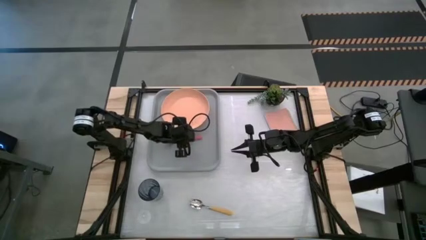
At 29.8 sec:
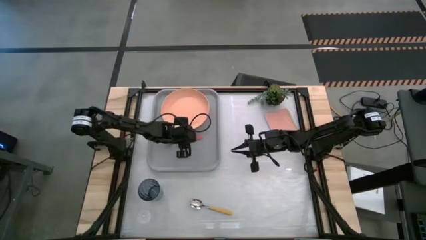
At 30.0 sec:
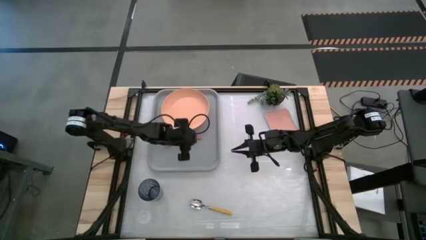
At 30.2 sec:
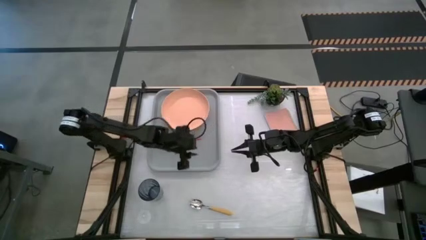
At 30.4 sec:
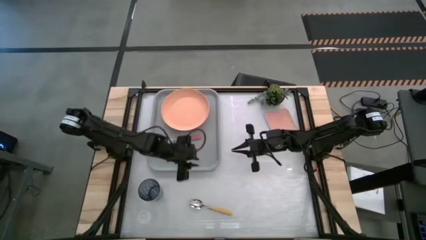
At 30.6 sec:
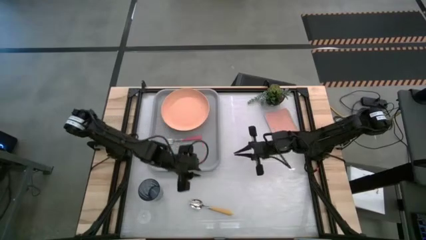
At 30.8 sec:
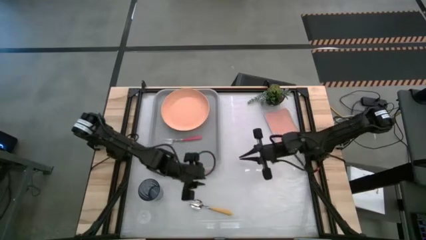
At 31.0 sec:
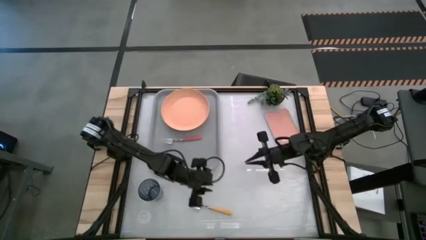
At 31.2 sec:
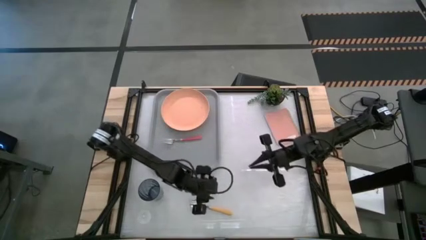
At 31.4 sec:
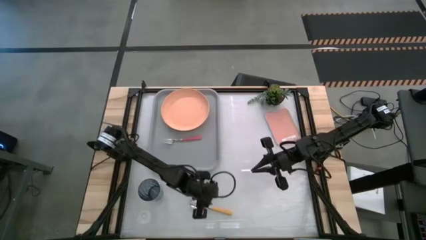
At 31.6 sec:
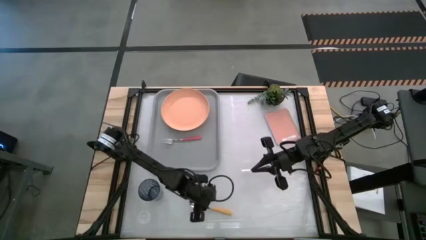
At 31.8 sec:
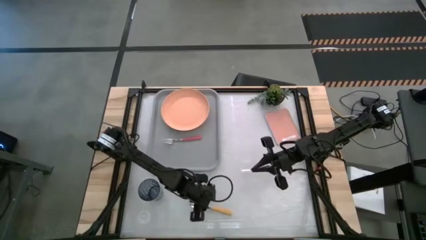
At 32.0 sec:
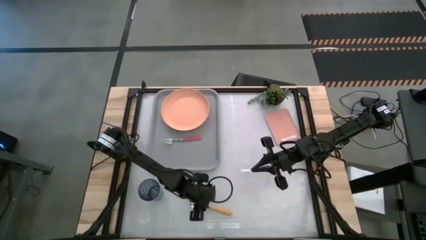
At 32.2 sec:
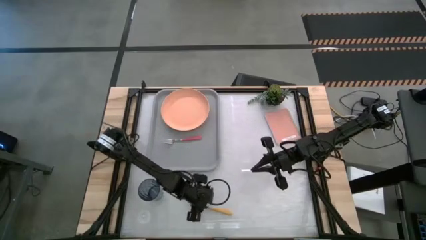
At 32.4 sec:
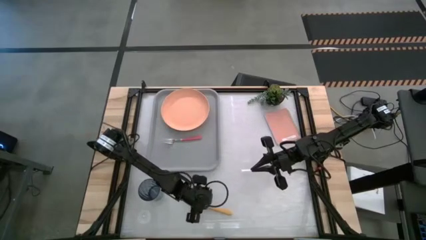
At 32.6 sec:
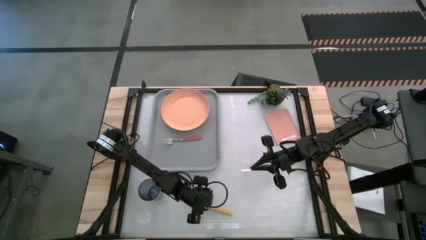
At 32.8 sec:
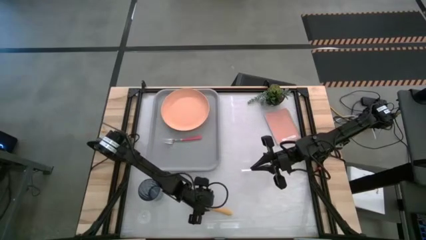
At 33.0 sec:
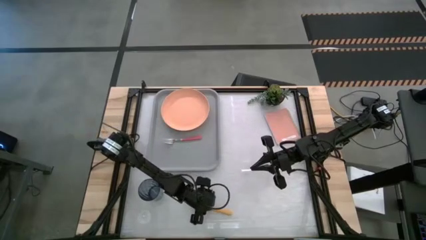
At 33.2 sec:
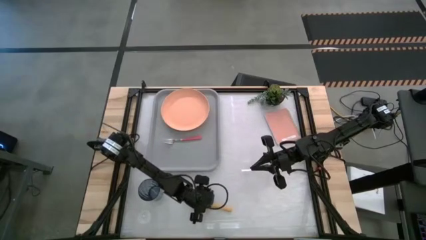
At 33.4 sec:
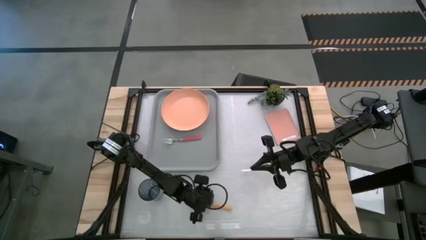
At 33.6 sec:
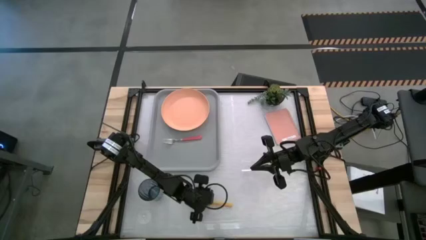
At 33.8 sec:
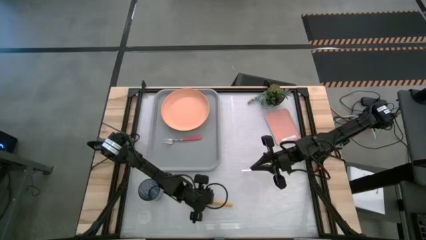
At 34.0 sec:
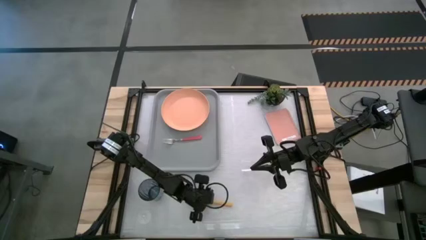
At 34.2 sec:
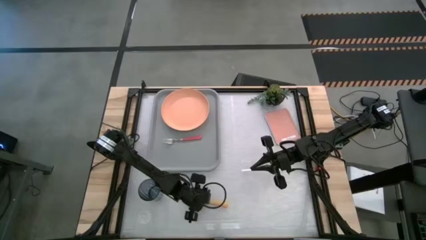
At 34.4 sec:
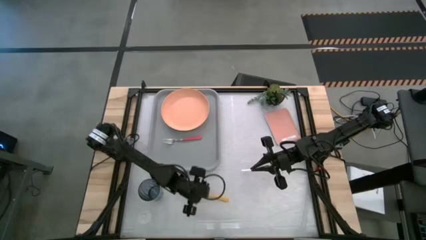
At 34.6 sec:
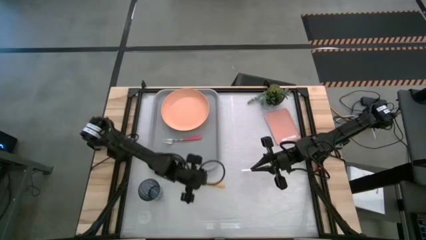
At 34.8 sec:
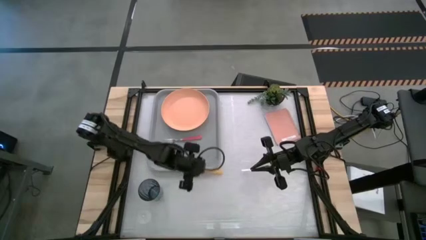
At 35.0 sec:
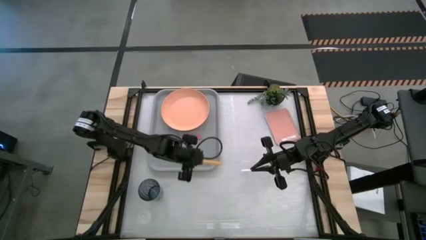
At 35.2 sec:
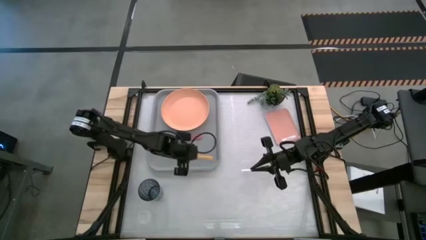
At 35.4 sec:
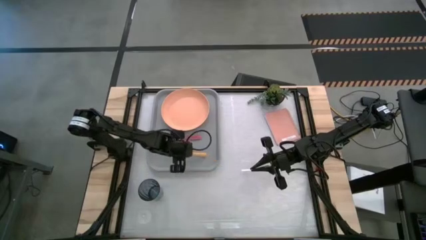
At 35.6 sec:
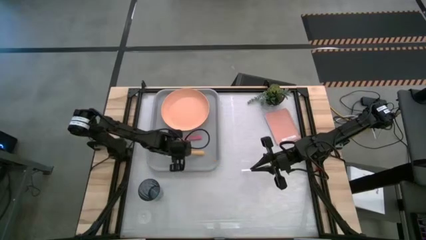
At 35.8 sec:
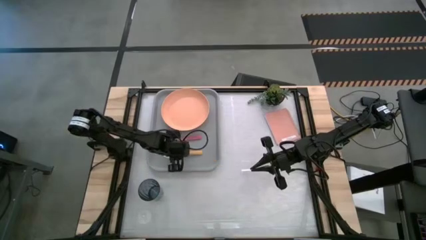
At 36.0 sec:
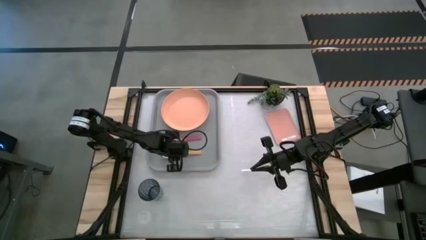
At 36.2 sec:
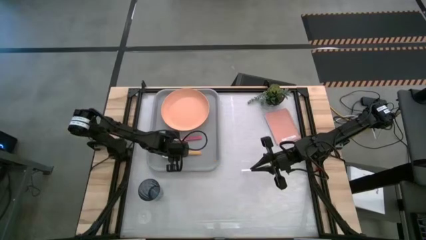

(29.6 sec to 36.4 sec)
Task: Pick and place plate/cup/fork/spoon on tray
Put the yellow spoon on the gray serving tray to the left of the pink fork

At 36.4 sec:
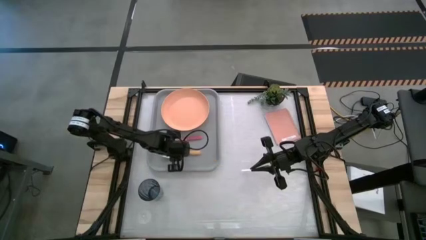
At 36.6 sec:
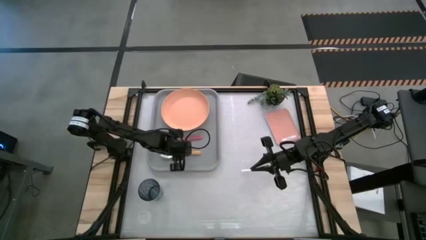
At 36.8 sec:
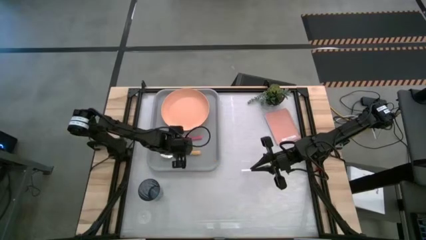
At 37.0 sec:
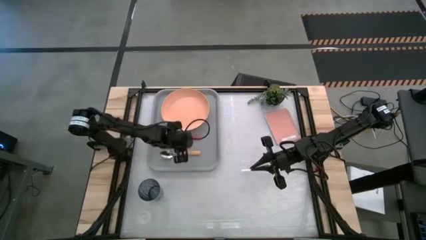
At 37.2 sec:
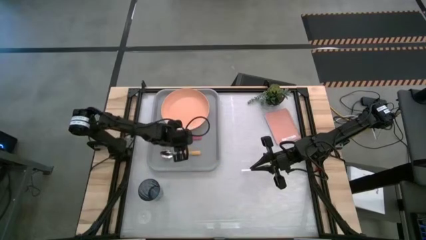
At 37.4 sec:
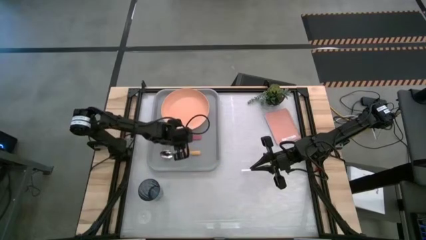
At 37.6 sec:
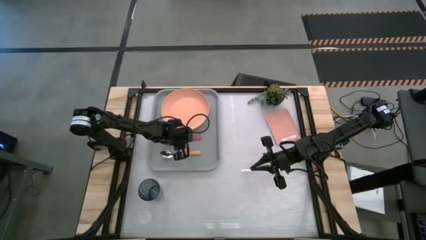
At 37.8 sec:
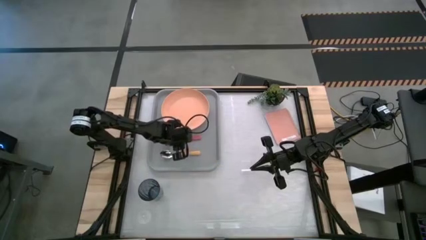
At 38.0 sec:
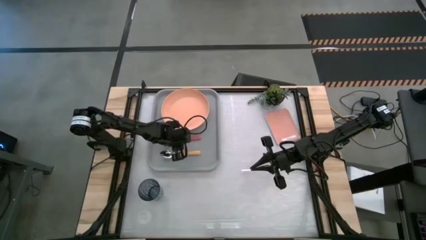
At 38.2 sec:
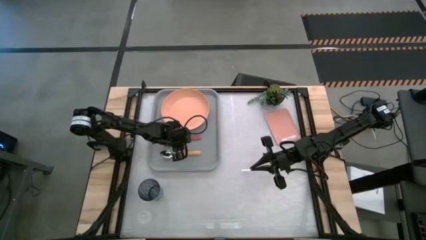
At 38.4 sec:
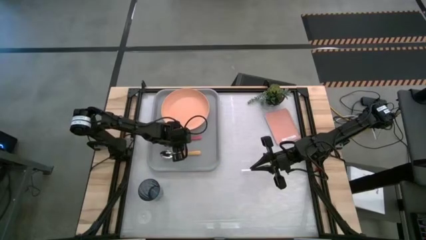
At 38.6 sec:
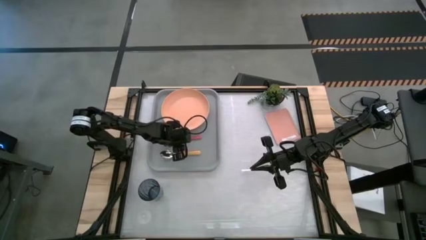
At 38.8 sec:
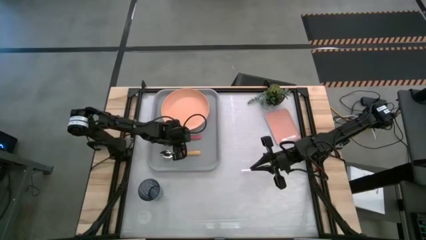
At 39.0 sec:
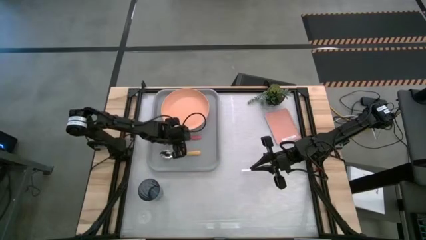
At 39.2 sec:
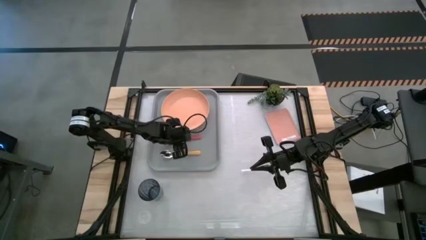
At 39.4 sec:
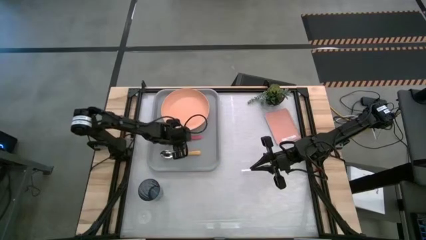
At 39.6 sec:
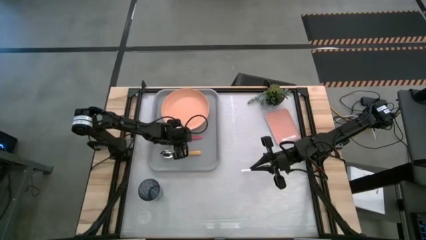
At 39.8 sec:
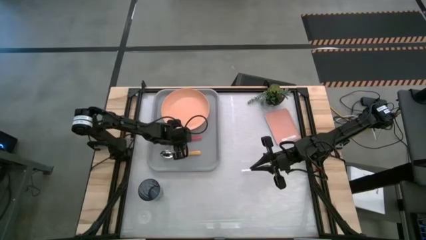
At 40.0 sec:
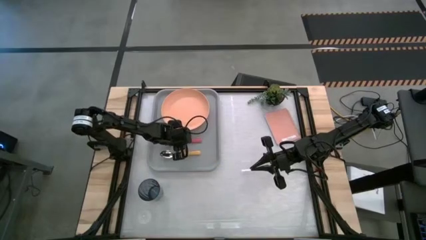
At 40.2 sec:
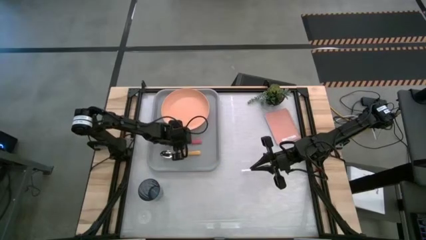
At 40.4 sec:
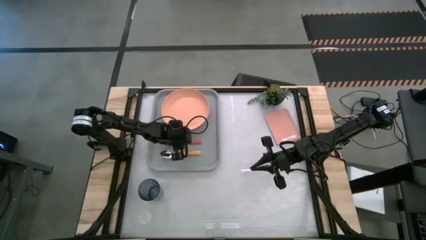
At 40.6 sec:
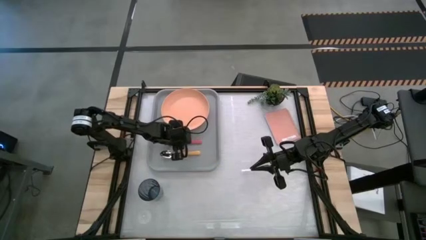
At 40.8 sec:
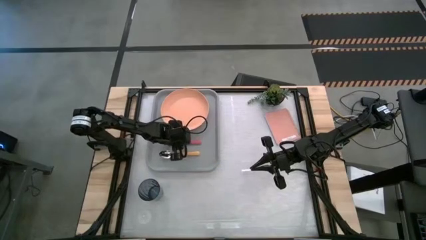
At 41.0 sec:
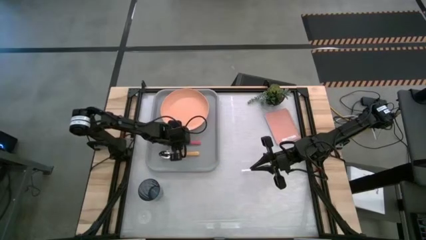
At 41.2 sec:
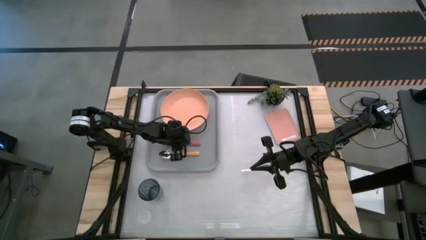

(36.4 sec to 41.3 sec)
Adjust the pink fork on the gray serving tray

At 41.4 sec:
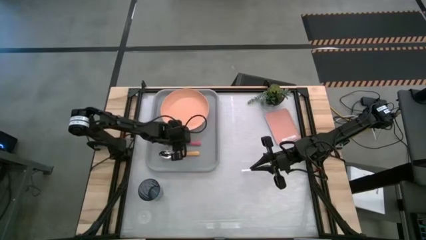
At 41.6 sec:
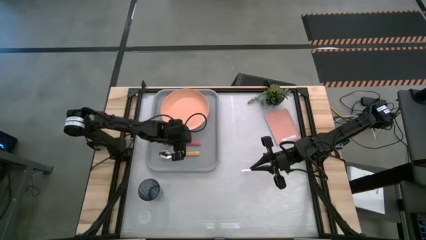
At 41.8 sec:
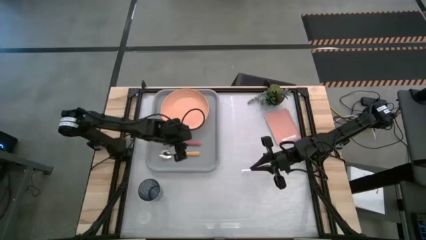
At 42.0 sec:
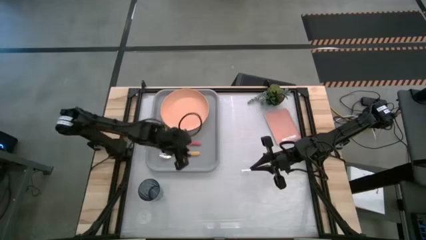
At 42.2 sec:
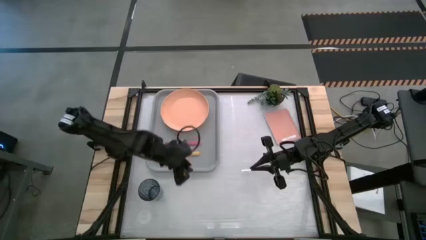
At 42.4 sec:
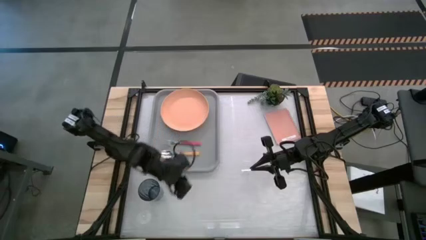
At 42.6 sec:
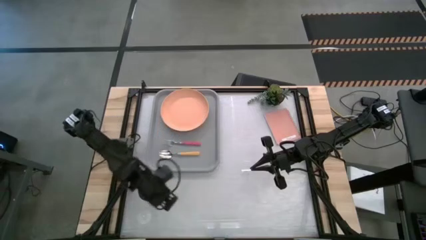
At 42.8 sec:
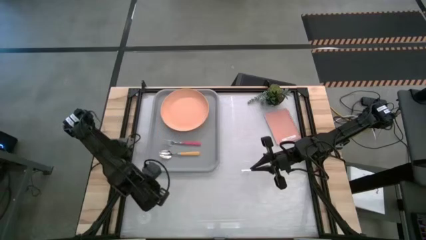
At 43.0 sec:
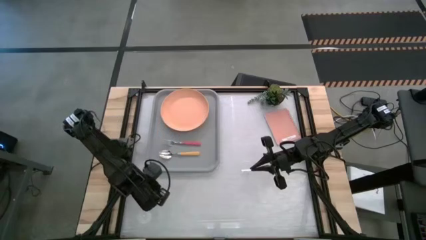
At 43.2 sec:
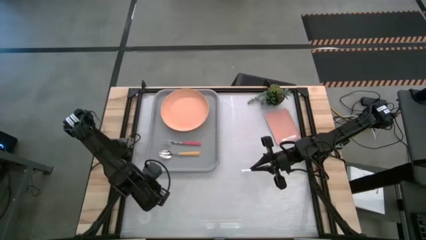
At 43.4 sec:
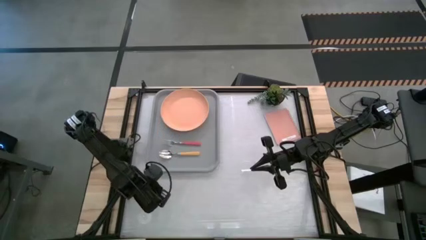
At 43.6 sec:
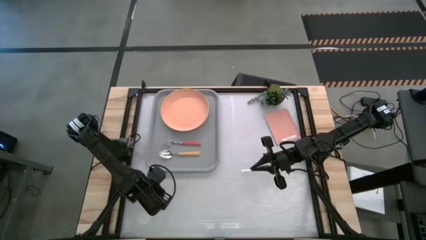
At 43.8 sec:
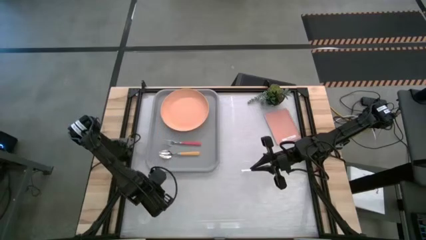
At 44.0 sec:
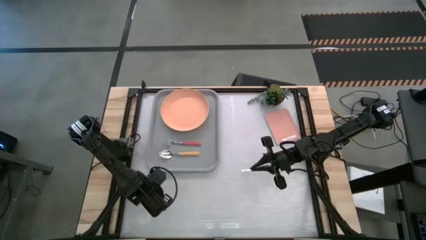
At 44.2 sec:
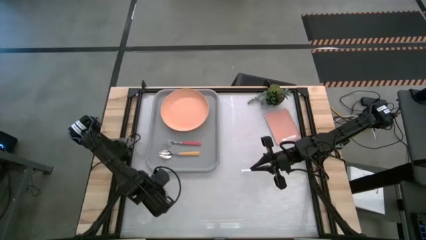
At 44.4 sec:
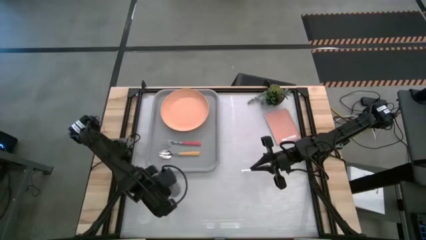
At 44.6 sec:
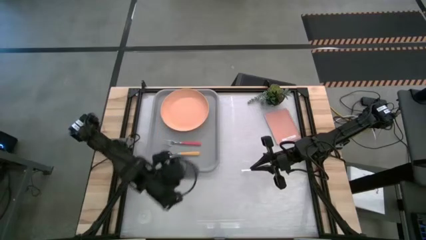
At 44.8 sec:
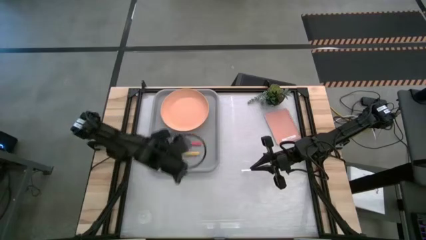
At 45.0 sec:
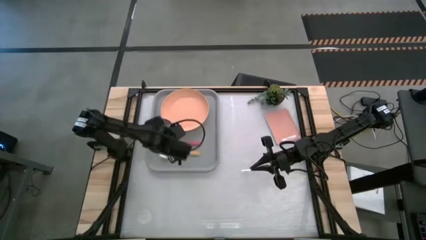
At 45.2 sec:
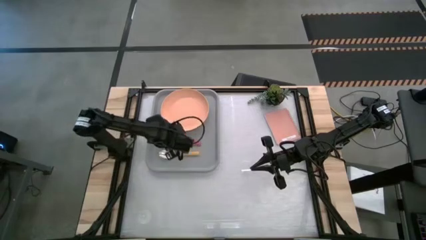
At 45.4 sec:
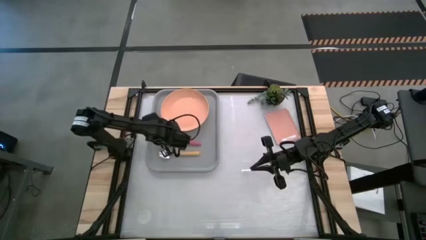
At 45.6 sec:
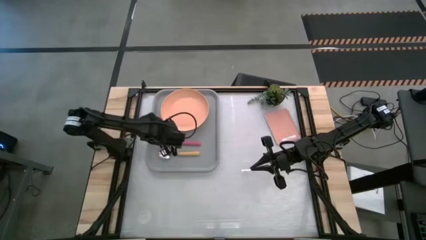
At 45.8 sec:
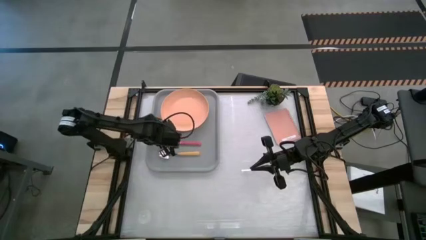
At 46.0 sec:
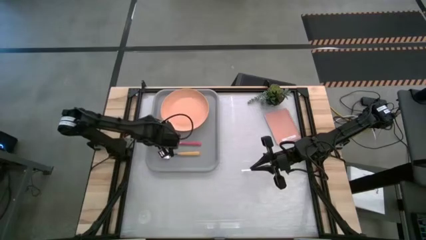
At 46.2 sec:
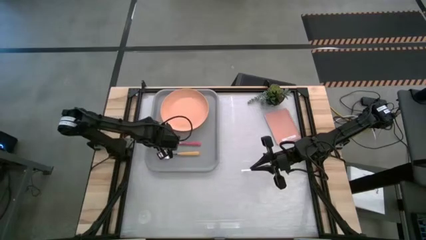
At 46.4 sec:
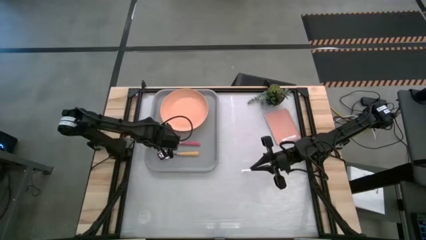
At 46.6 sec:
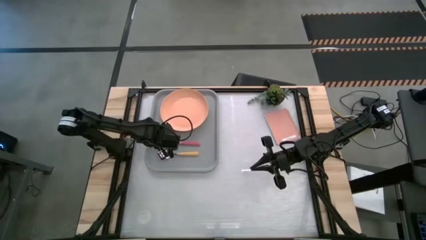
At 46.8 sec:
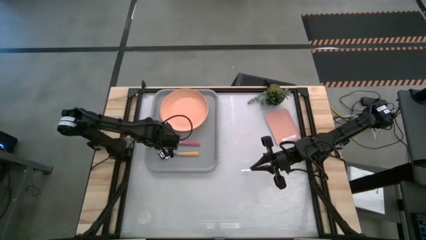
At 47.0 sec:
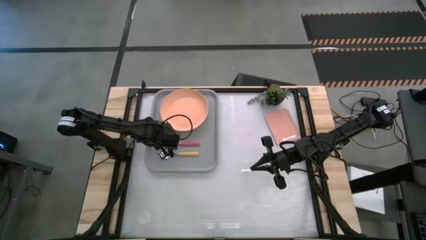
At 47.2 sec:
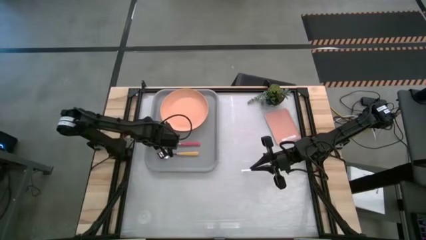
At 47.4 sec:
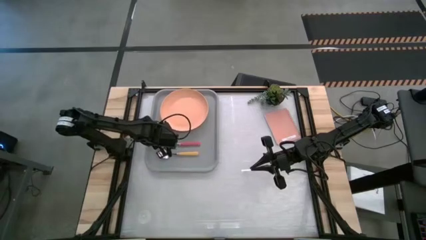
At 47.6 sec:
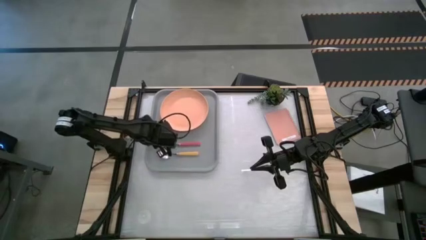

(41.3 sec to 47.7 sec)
Put the blue glass on the gray serving tray to the top left of the orange plate
